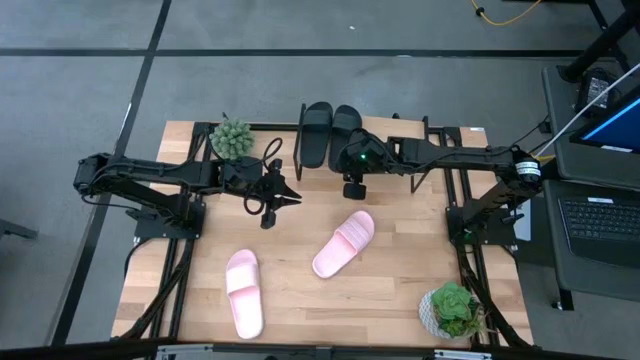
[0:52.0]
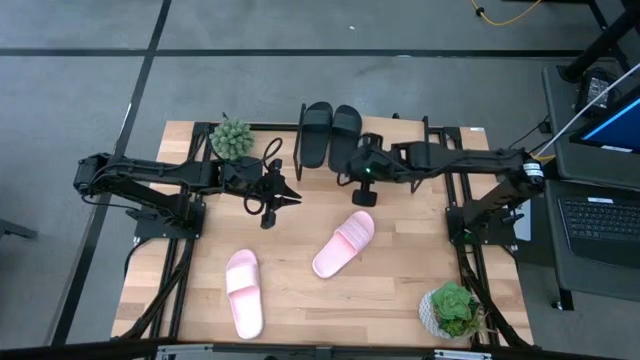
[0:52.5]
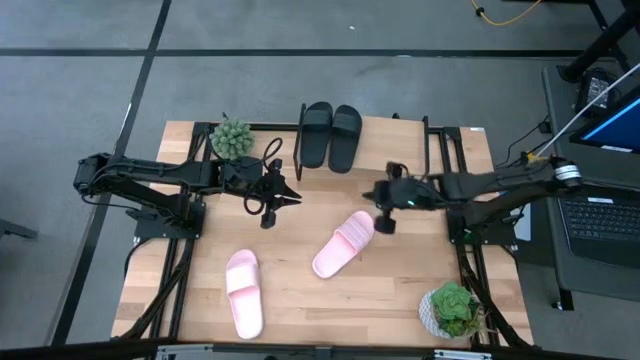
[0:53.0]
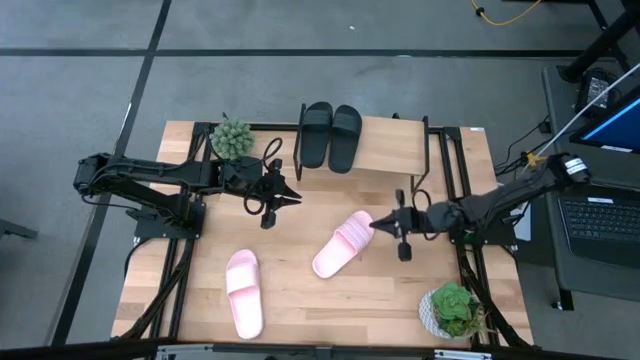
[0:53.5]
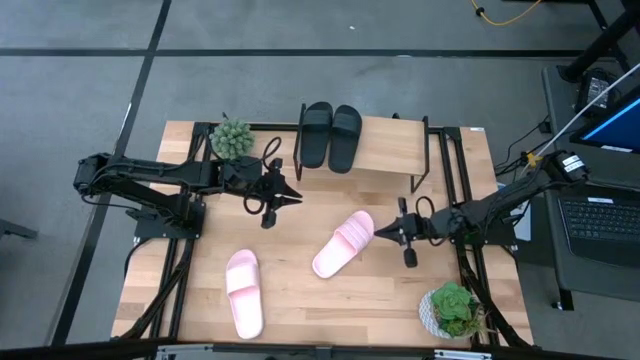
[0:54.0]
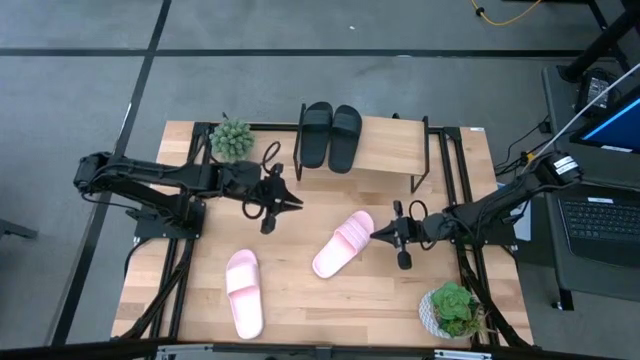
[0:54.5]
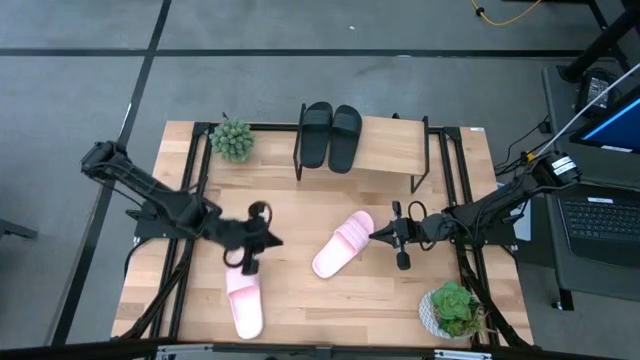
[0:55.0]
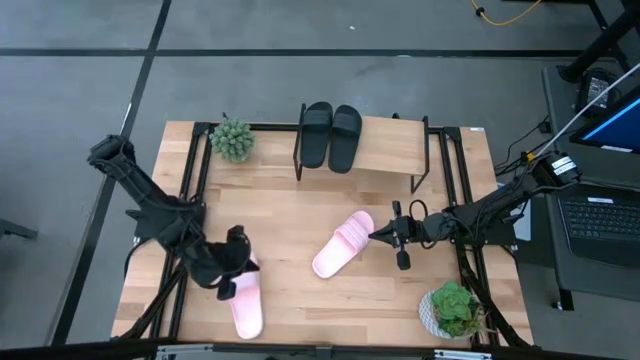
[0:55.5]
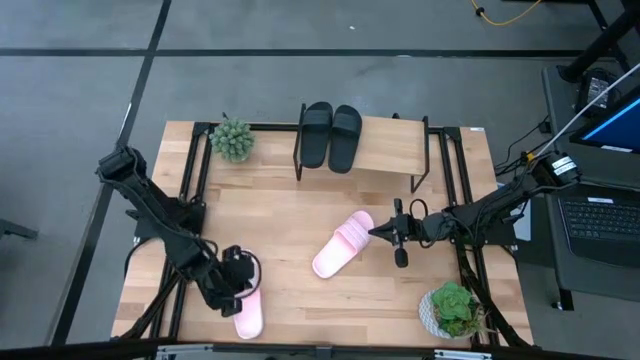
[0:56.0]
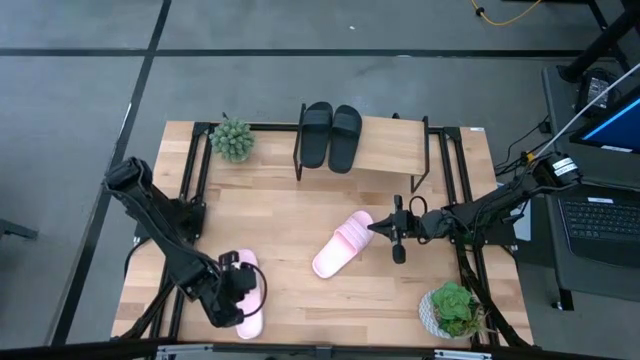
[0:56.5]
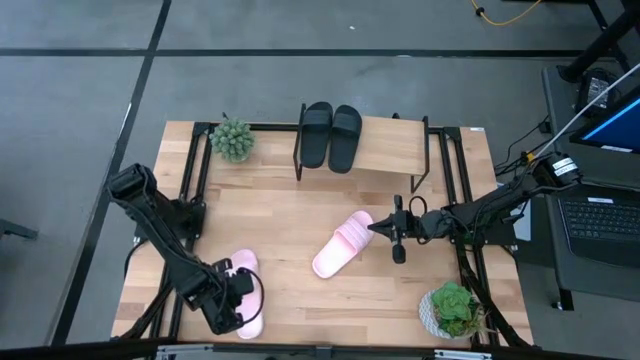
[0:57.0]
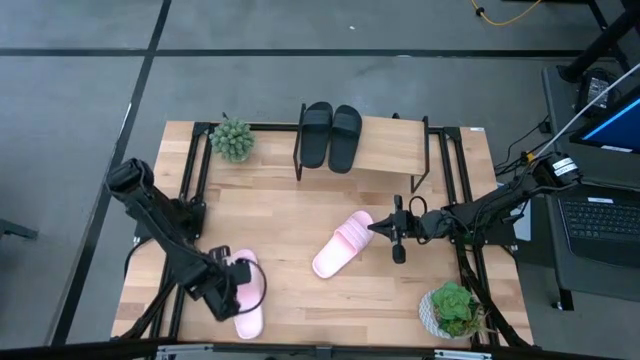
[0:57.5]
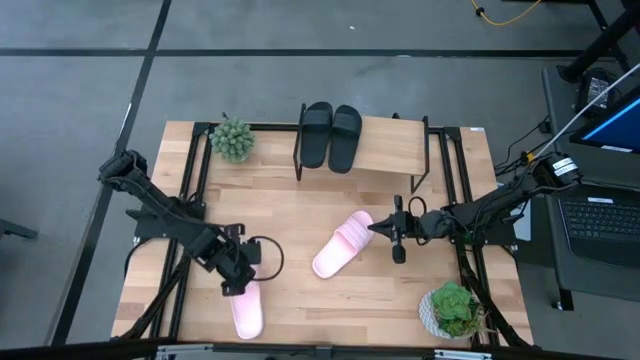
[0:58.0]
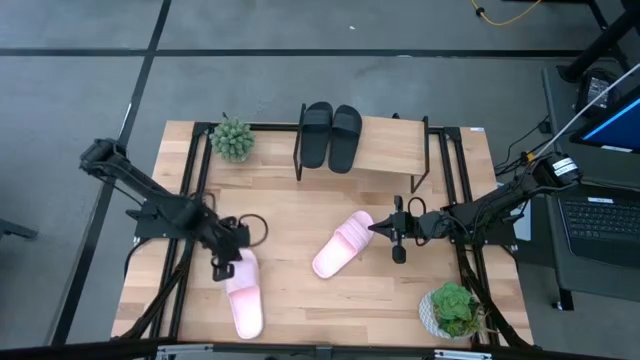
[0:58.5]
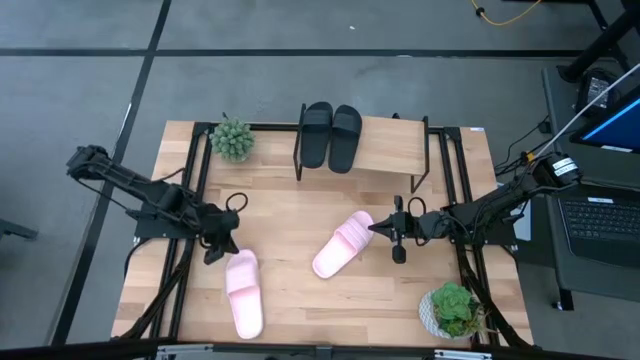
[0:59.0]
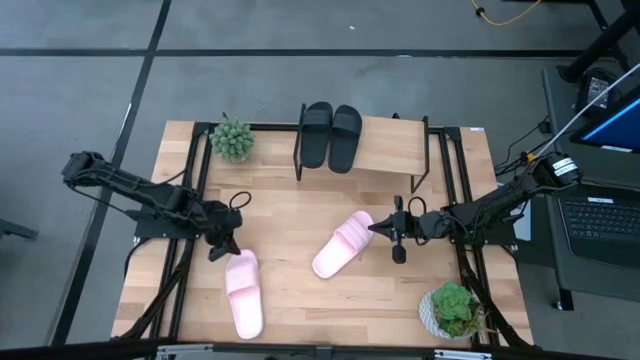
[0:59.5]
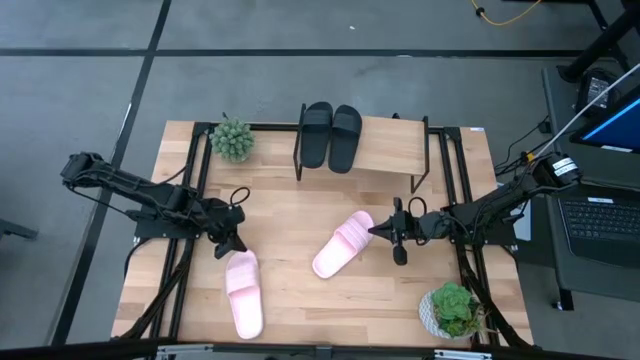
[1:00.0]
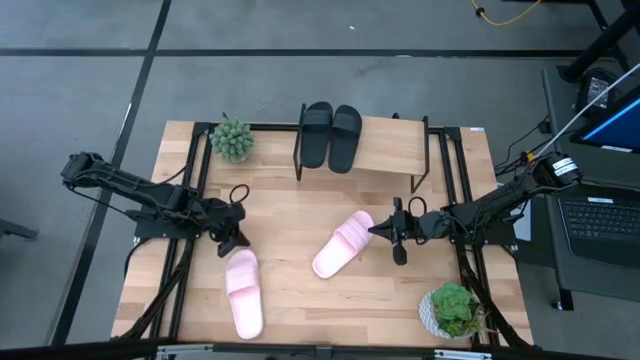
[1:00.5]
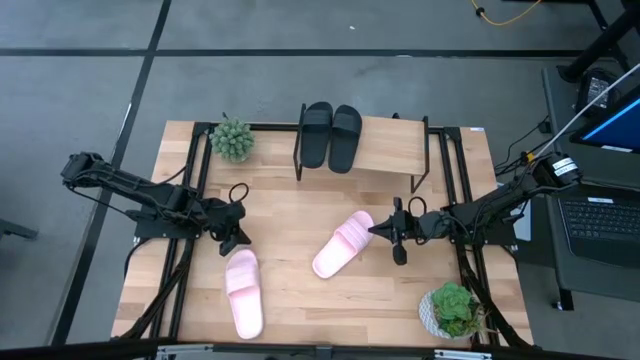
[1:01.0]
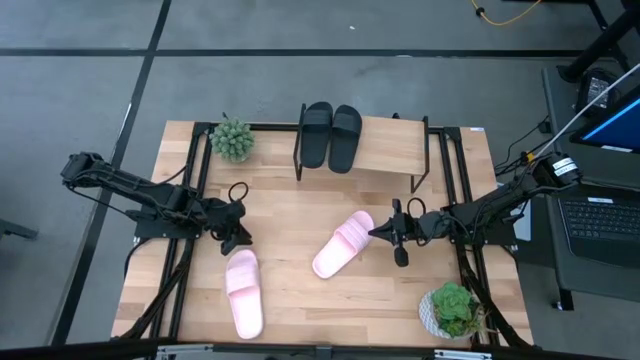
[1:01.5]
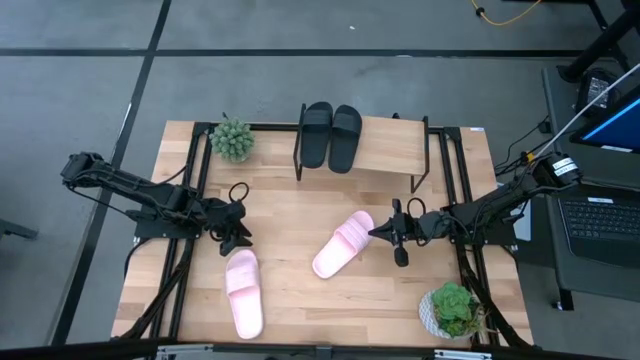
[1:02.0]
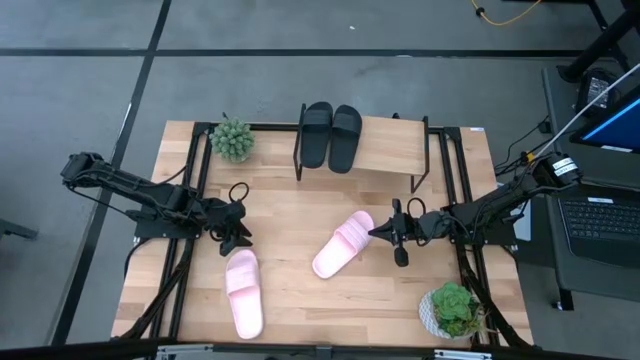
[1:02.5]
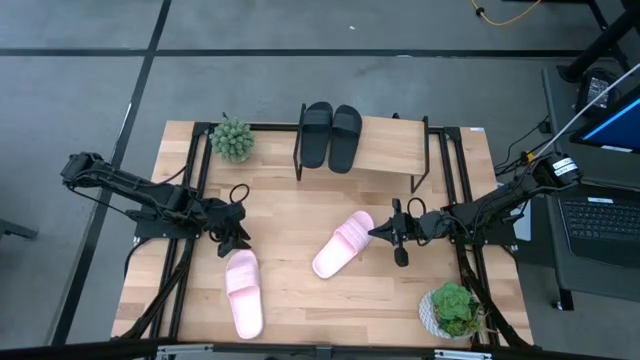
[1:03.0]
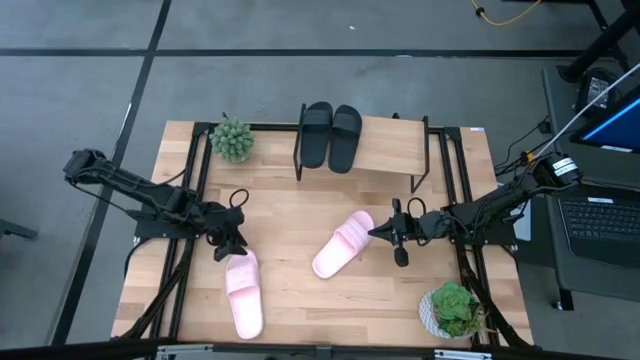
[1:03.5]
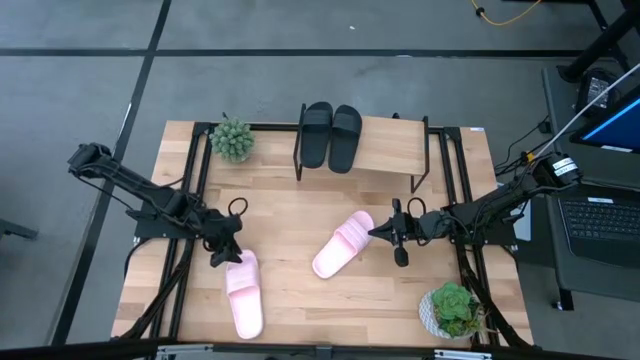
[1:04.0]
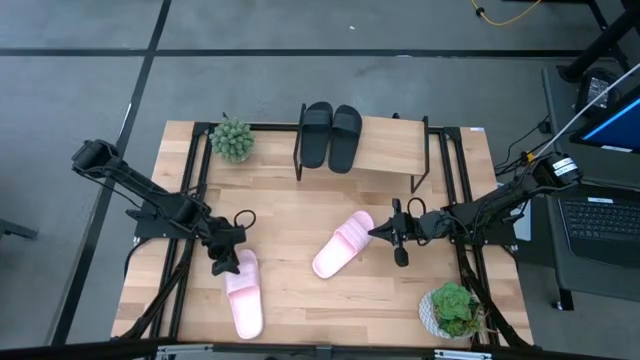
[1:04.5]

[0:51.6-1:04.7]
Task: Pick and place slides into the shelf
Put the left pink slide on the shelf
